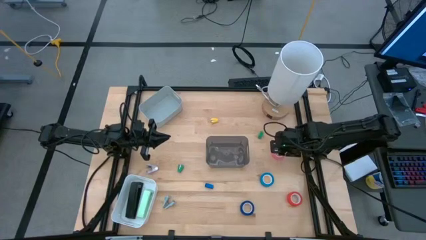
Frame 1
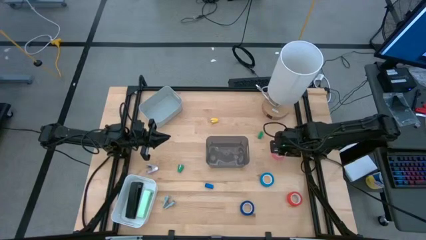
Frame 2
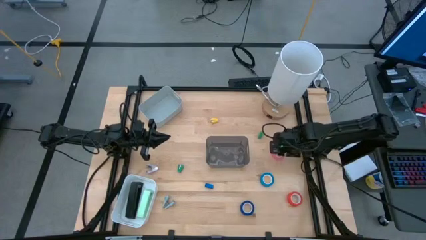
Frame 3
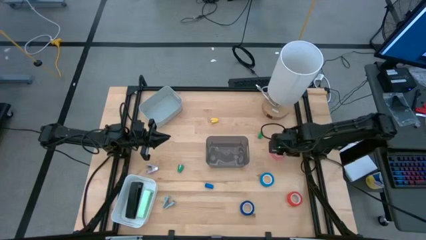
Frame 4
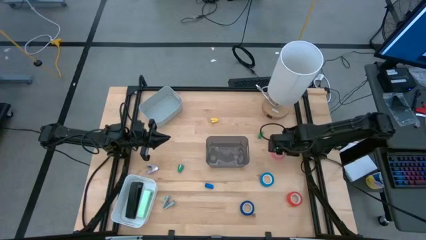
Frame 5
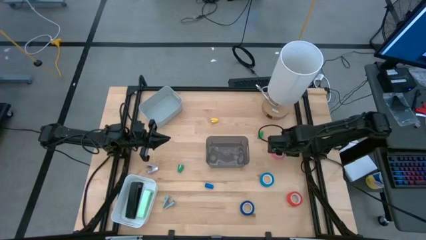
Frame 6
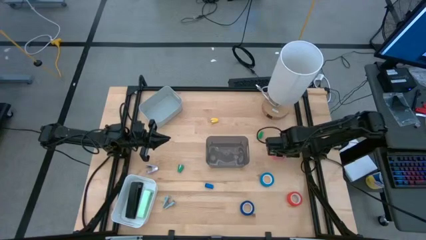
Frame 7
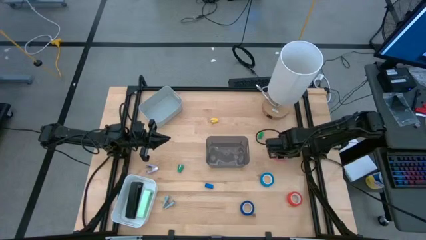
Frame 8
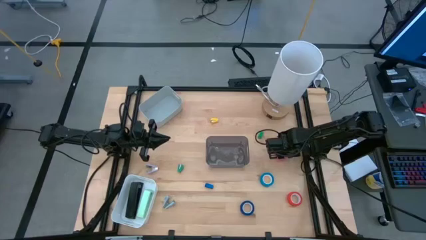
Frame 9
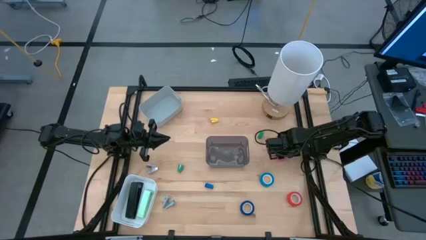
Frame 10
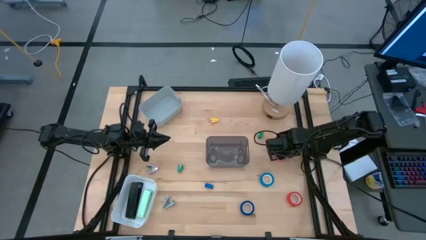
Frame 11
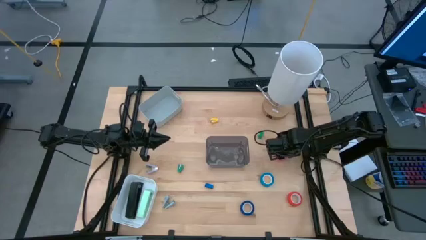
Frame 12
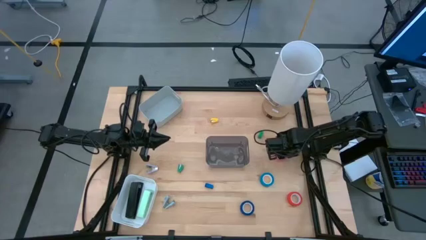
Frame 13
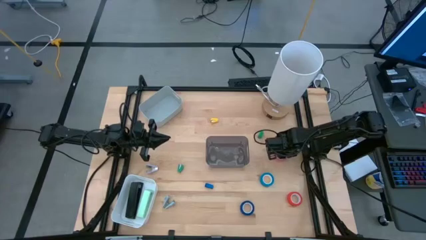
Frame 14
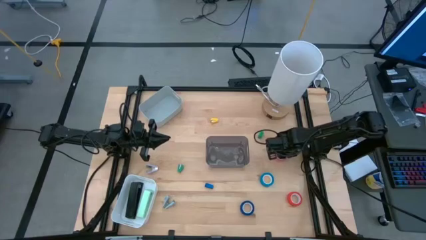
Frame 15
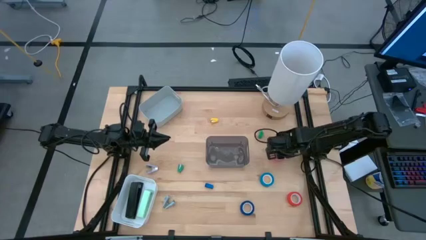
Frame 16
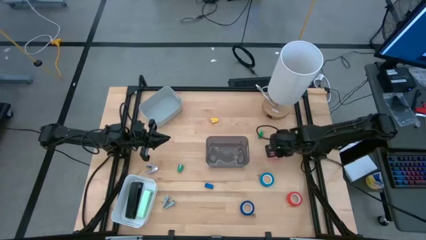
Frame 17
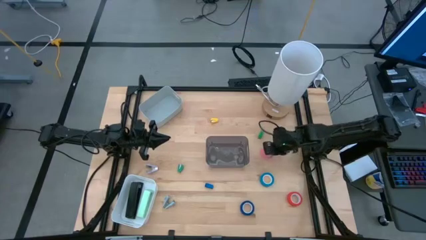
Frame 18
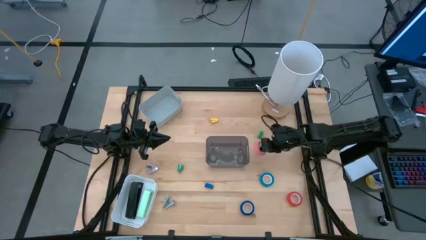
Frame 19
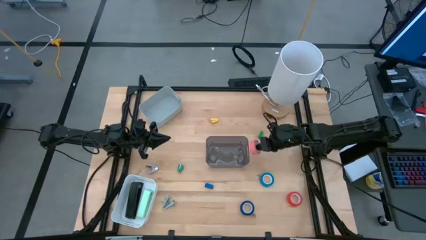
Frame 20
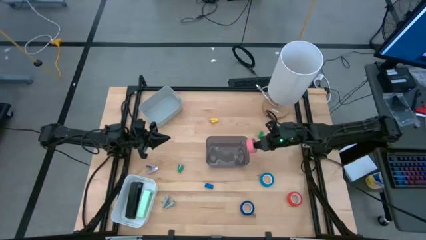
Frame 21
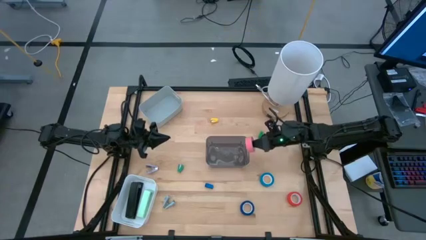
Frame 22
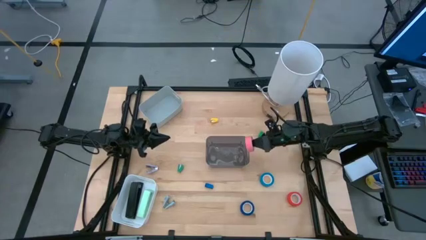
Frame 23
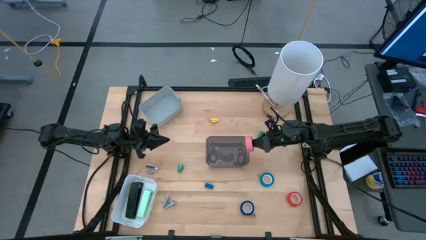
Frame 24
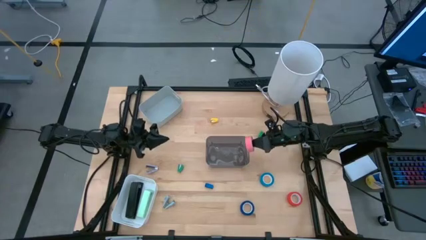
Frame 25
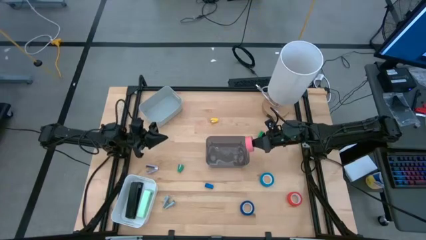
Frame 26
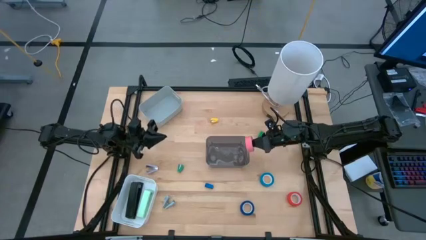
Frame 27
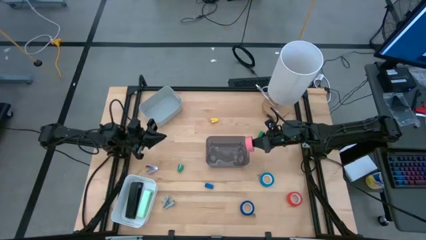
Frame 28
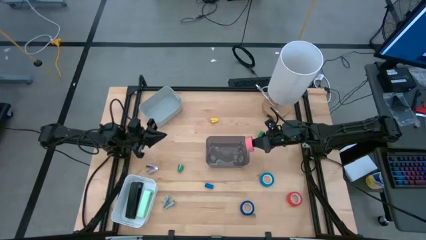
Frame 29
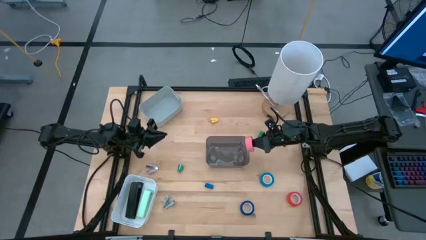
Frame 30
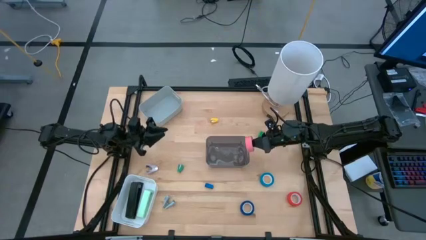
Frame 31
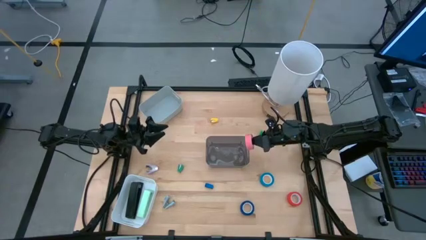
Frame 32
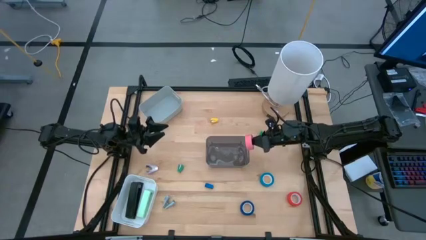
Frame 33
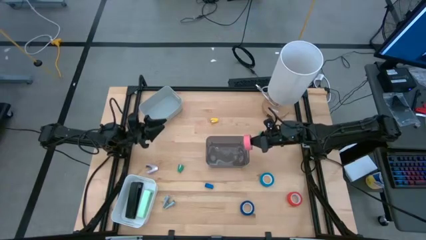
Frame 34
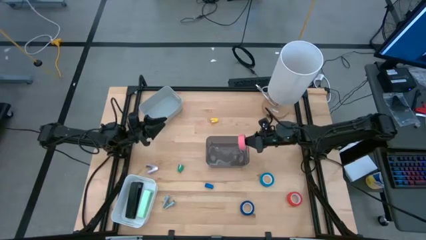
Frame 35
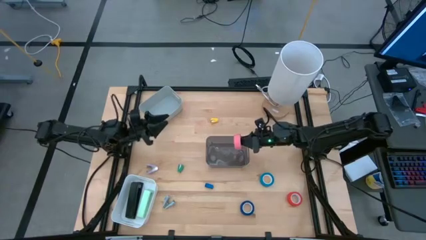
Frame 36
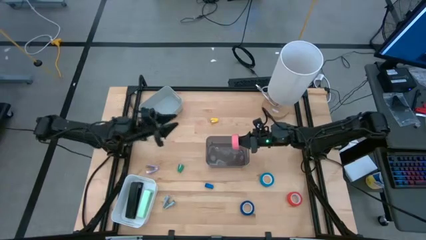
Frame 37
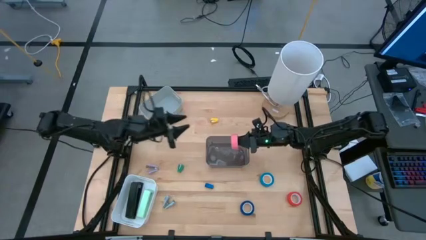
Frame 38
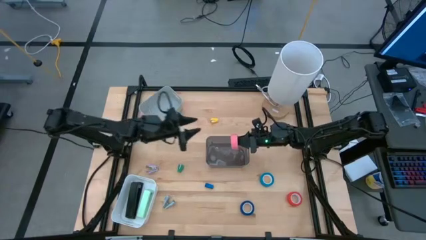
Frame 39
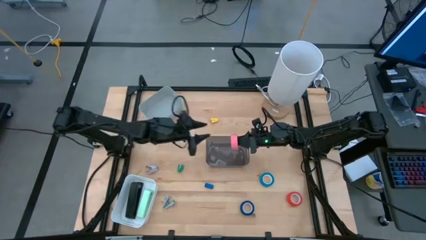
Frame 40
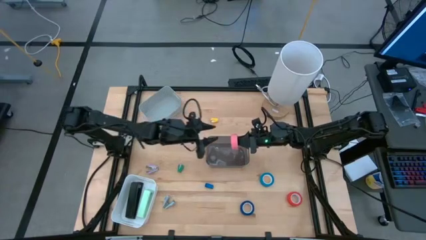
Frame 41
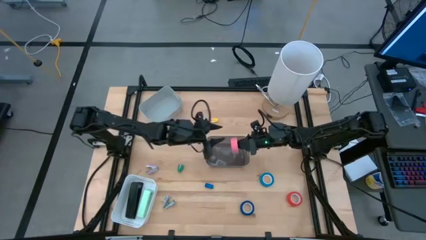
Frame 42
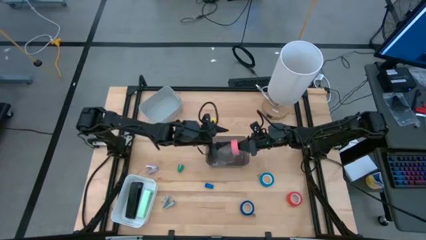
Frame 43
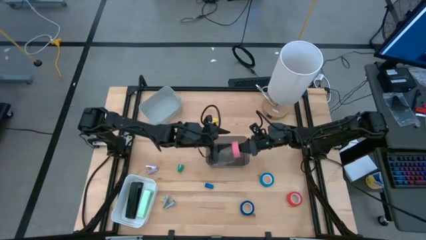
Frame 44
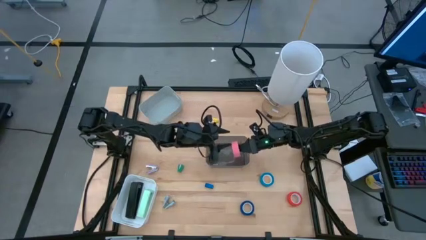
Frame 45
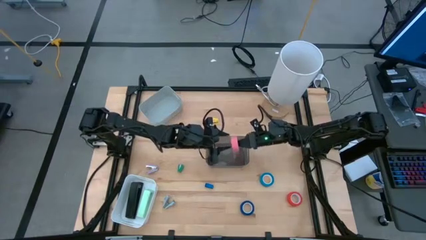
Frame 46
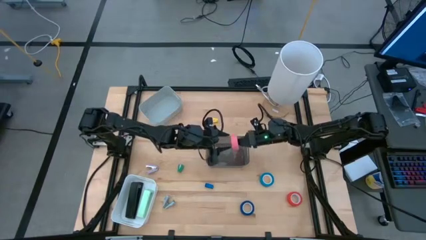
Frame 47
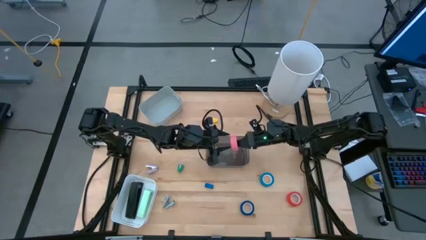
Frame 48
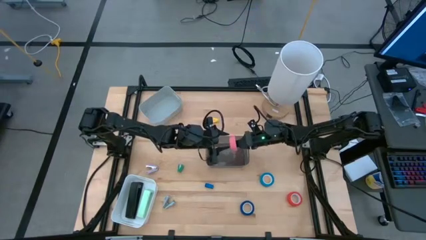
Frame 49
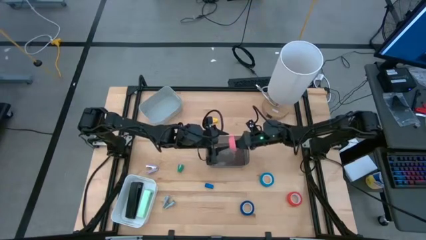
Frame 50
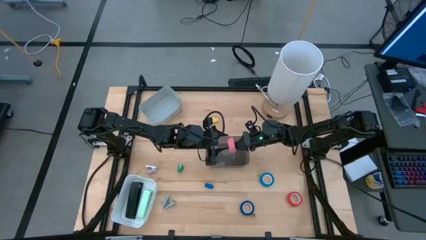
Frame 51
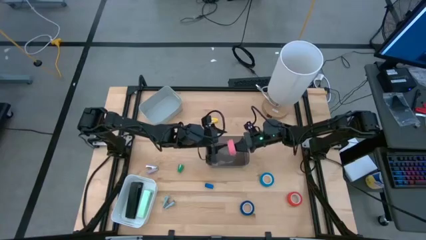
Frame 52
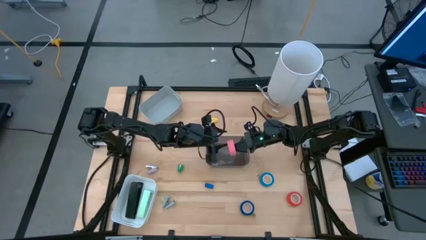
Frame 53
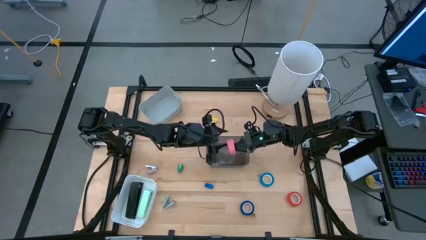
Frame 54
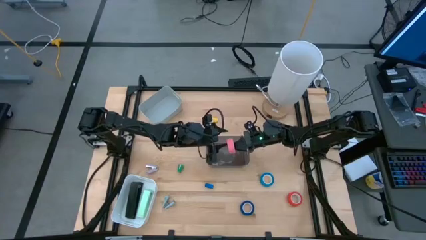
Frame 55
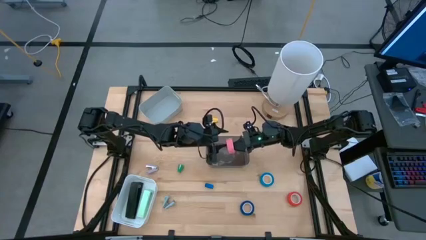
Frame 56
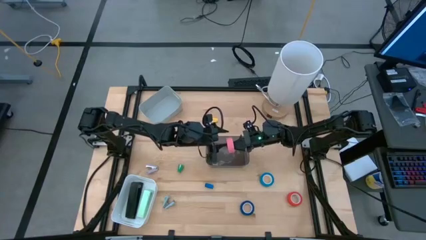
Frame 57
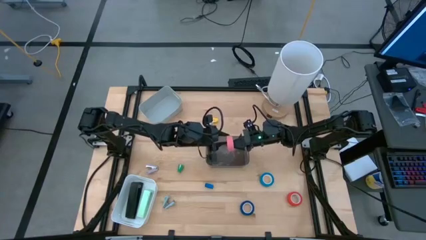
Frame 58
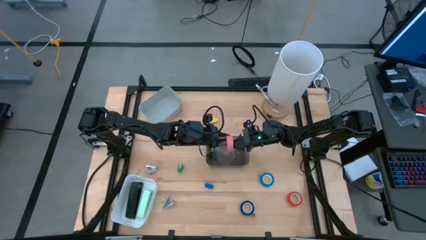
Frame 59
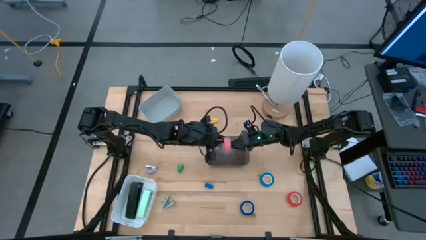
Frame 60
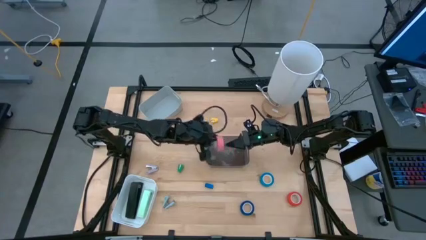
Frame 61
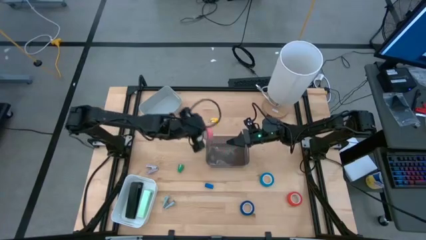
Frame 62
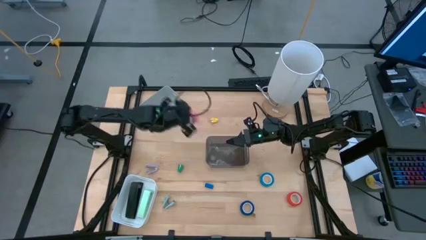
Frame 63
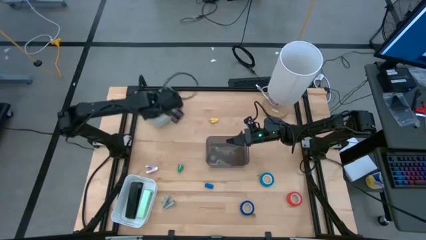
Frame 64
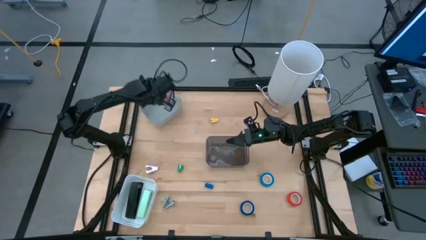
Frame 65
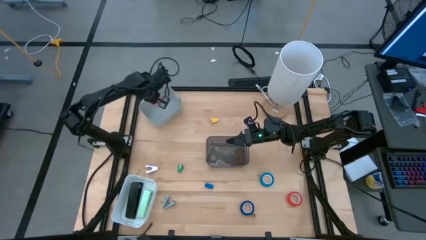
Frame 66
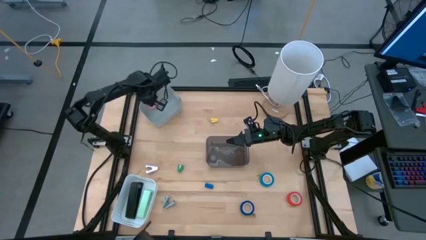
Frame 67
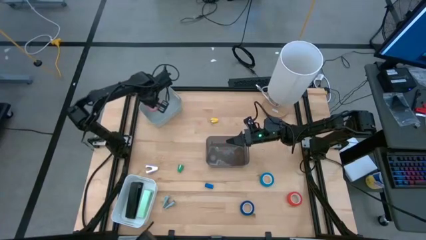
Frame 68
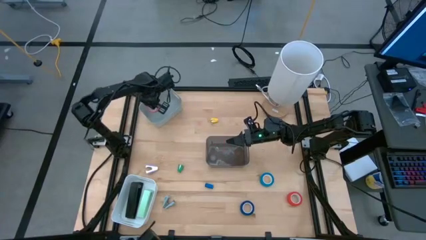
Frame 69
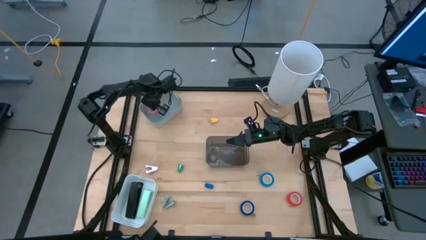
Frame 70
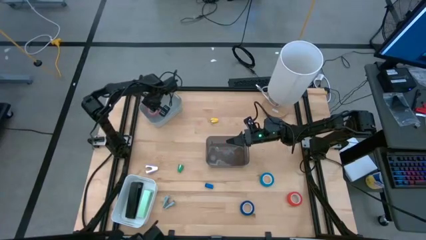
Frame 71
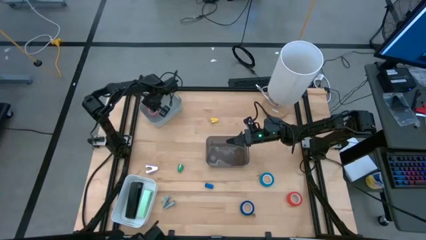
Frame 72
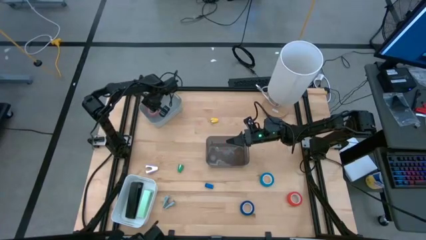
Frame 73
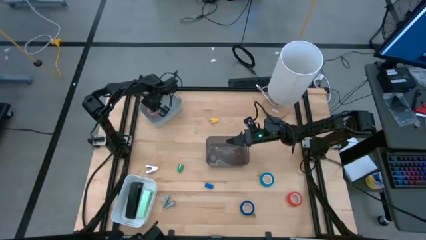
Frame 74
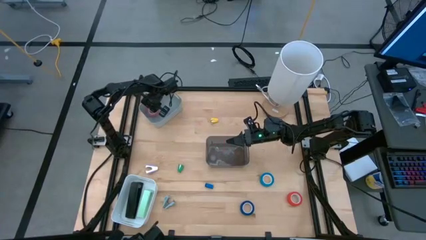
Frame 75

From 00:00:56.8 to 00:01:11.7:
Task: Pick and place Stapler, Stapler remover, tape
Put the pink tape into the grey bin
